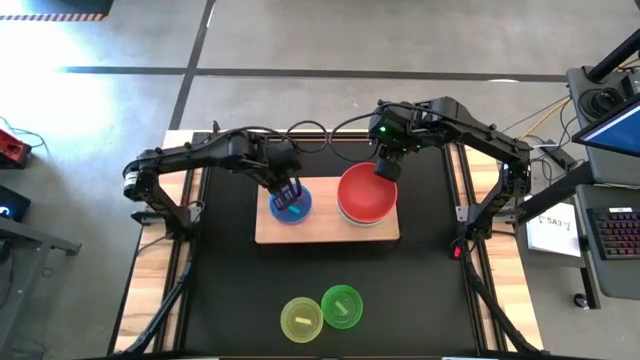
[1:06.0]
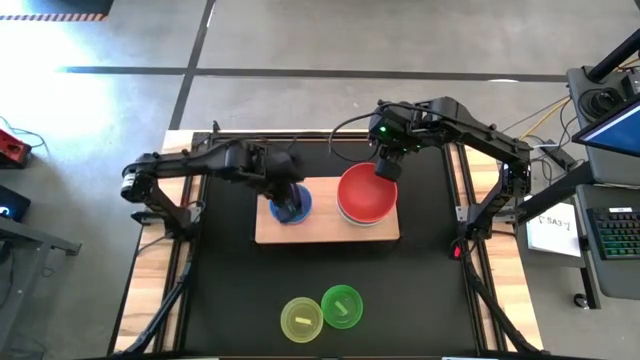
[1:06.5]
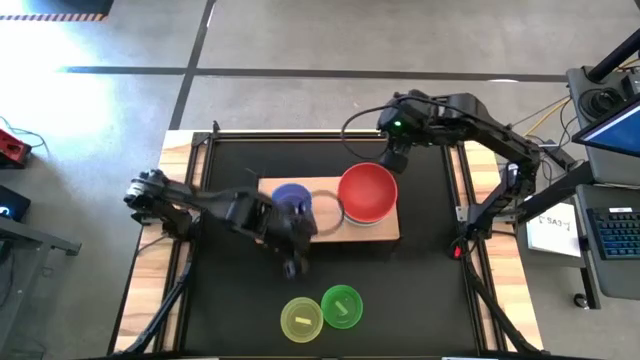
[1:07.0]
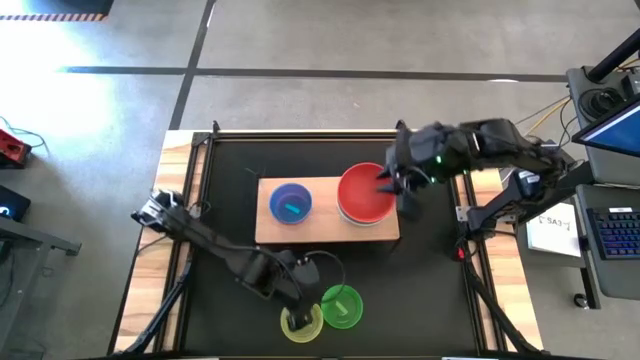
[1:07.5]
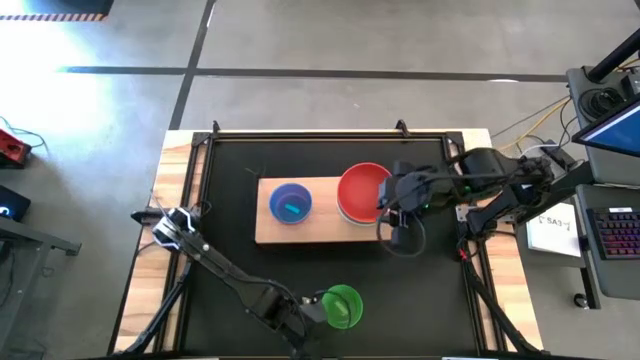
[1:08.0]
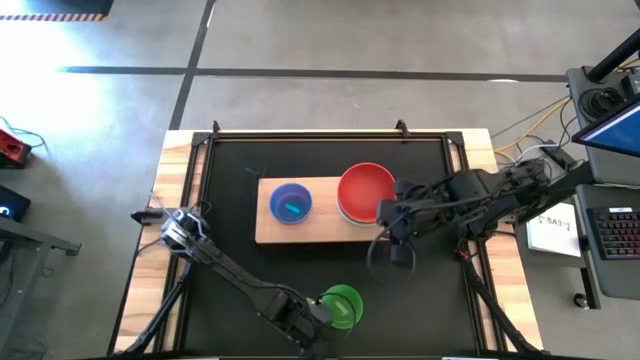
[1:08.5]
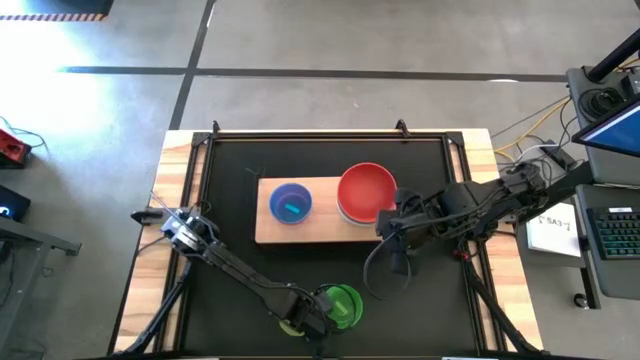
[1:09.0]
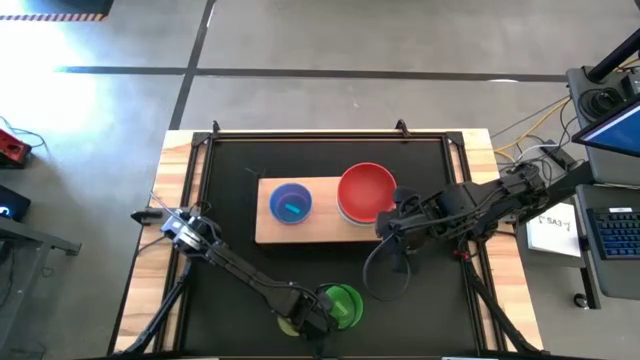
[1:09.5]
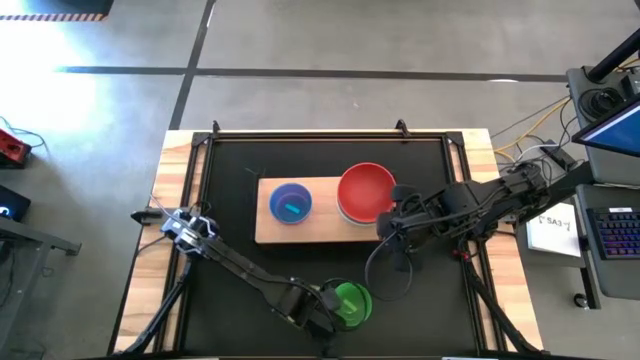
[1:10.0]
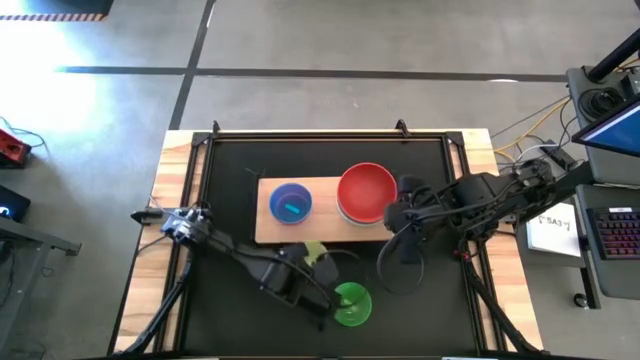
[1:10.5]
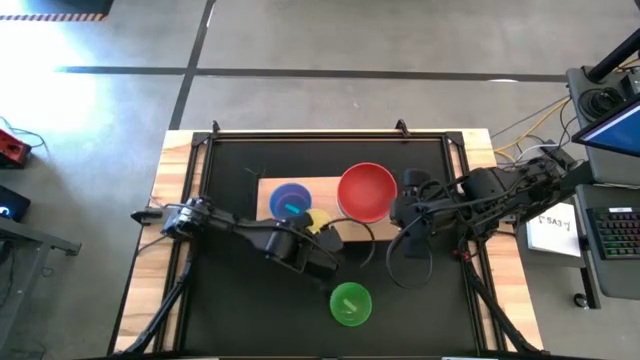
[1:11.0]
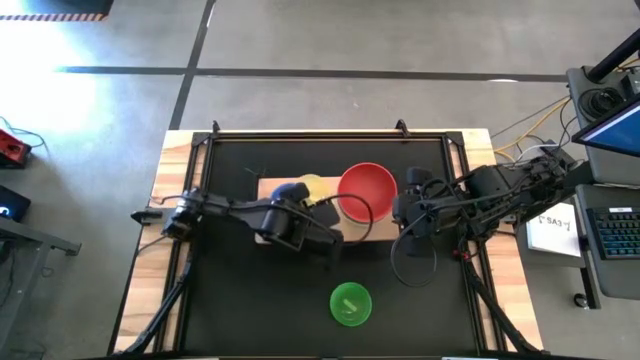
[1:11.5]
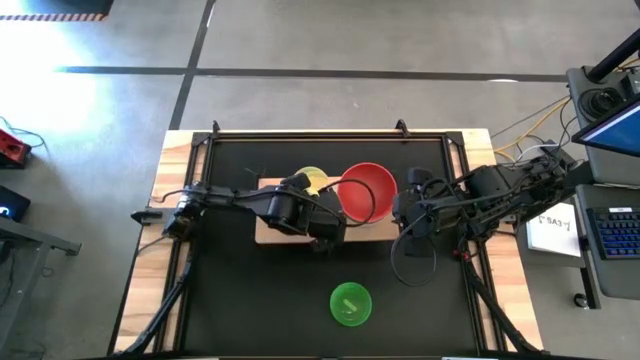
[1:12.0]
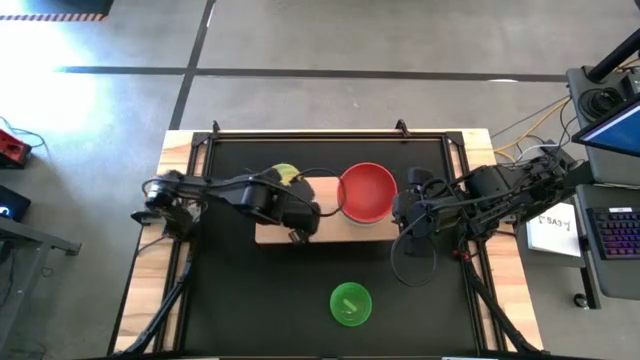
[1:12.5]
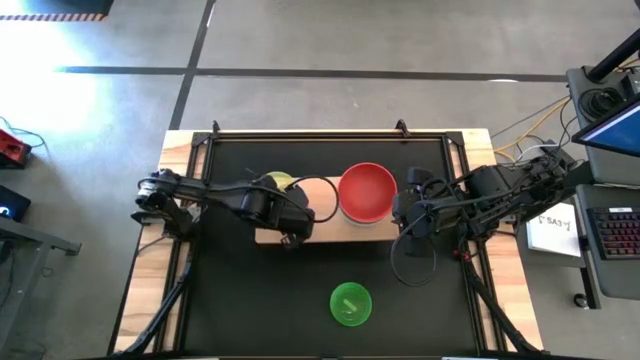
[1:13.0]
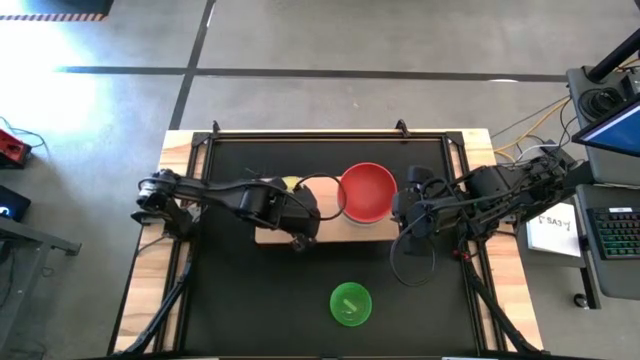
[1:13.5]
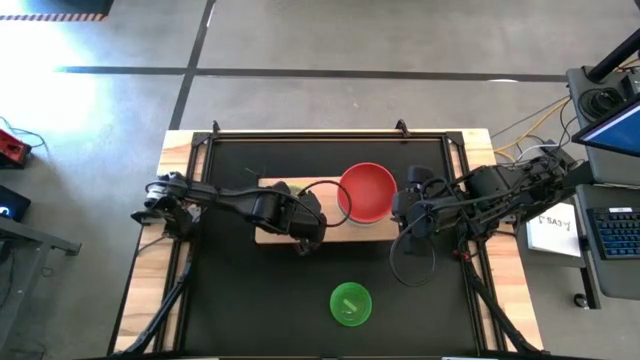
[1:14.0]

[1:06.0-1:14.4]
Task: Place and stack bowls onto a shelf
Stack the small yellow bowl on top of the small light blue bowl on the shelf

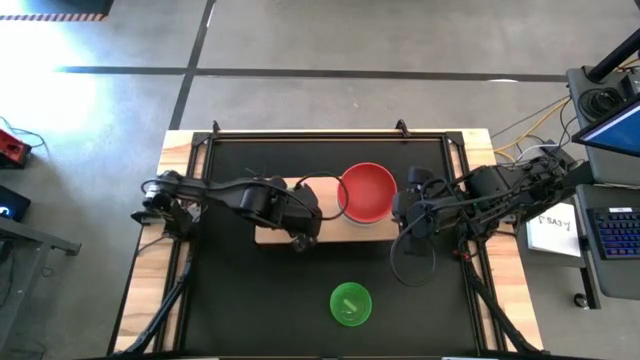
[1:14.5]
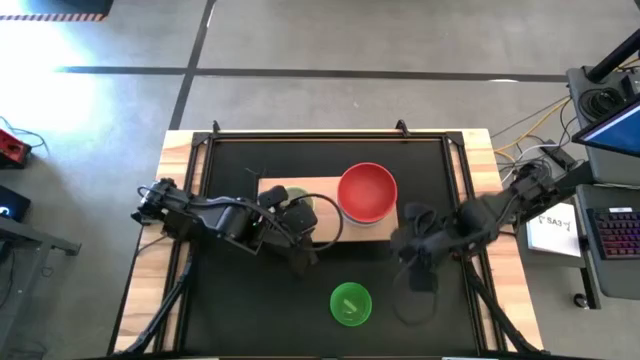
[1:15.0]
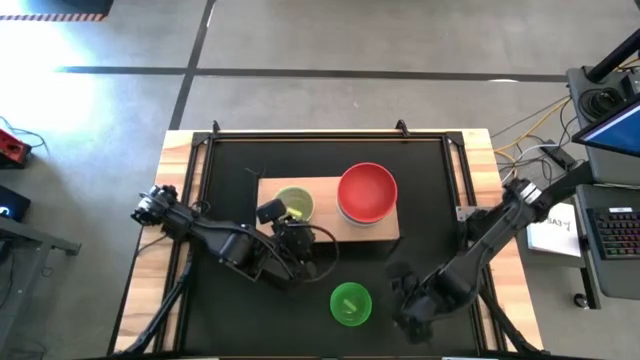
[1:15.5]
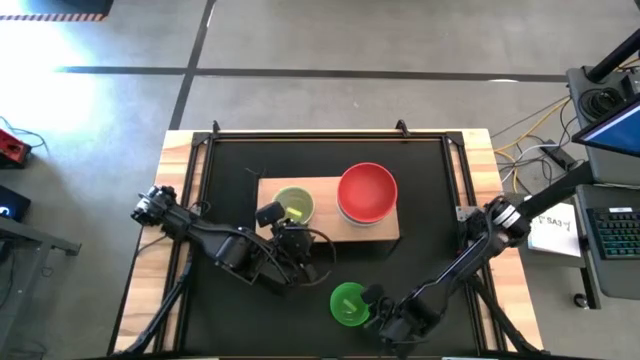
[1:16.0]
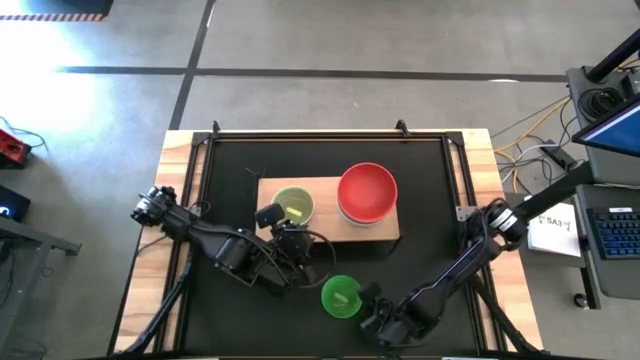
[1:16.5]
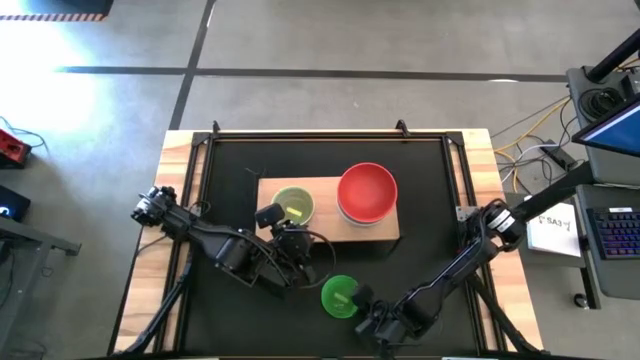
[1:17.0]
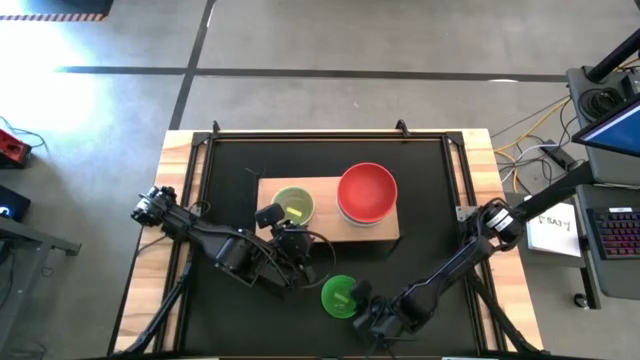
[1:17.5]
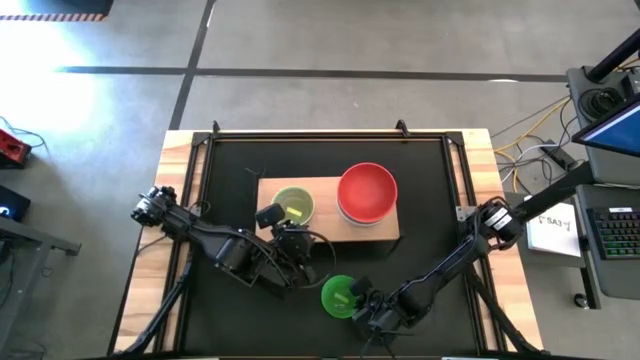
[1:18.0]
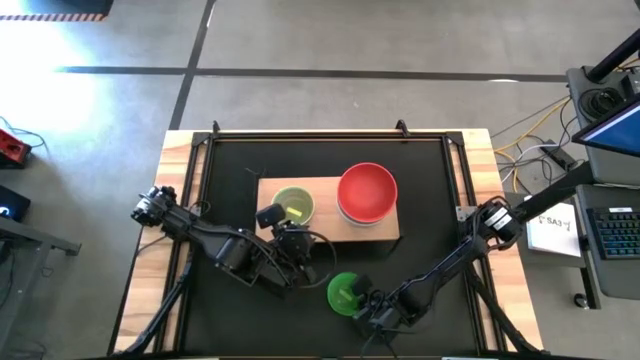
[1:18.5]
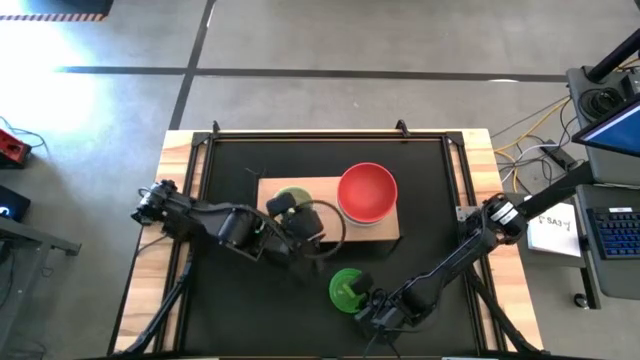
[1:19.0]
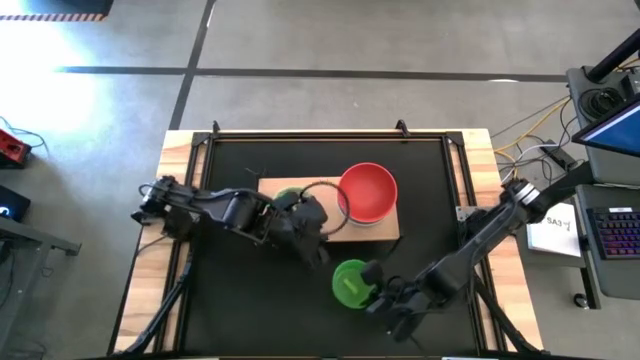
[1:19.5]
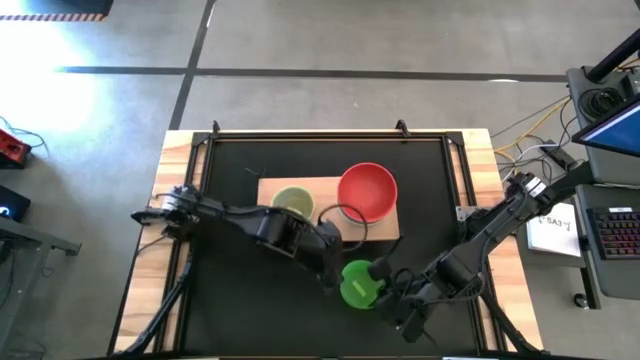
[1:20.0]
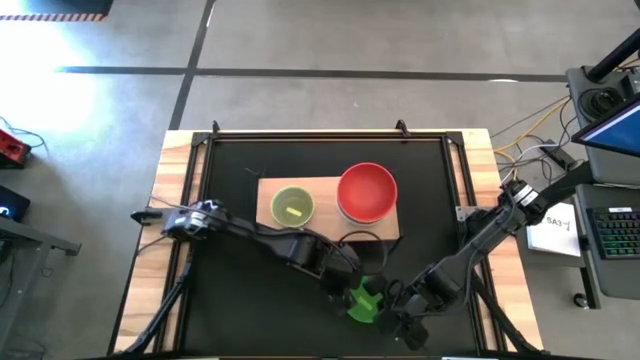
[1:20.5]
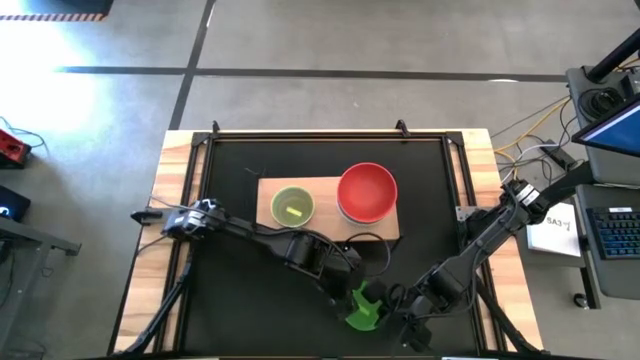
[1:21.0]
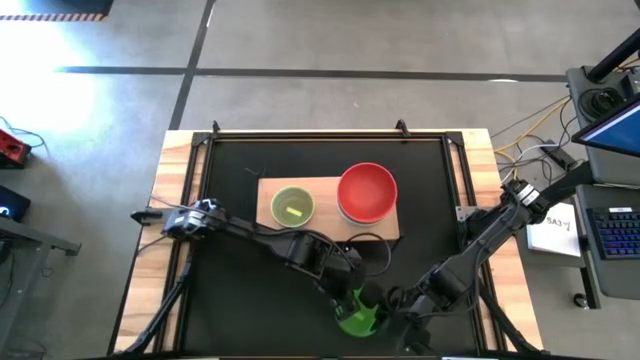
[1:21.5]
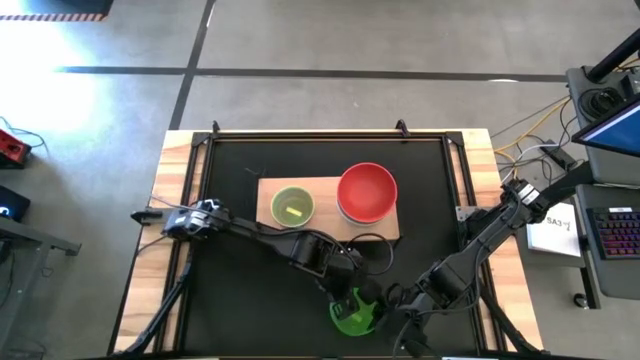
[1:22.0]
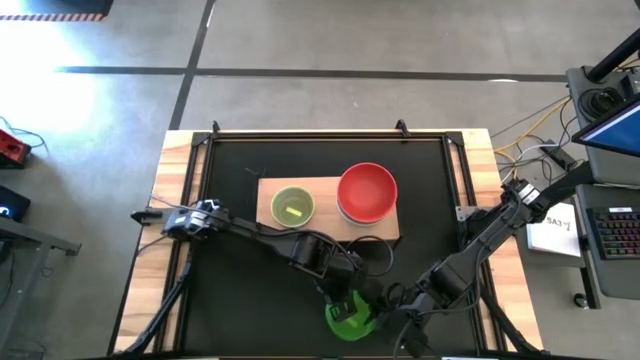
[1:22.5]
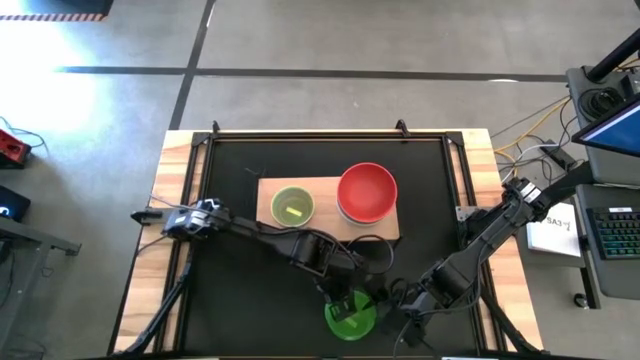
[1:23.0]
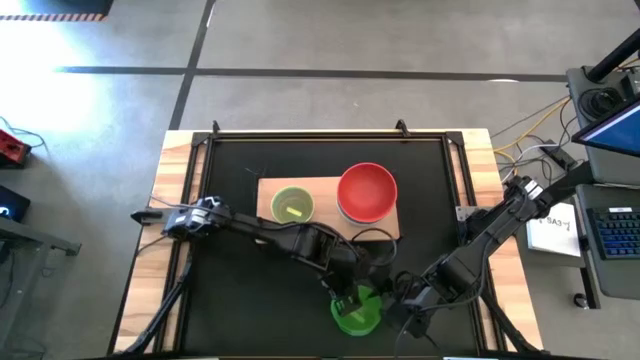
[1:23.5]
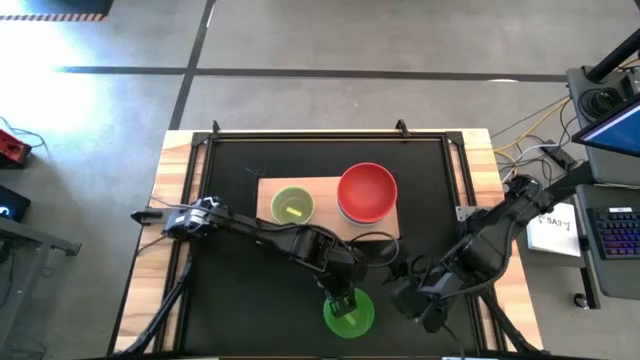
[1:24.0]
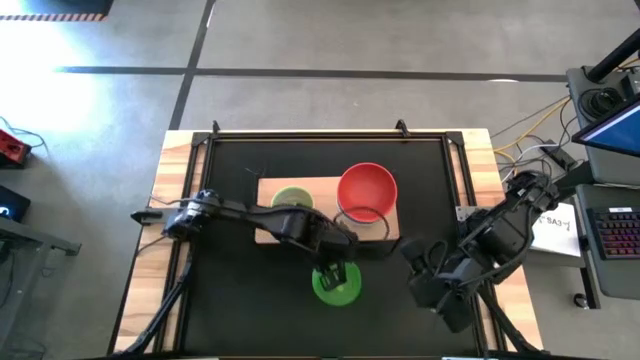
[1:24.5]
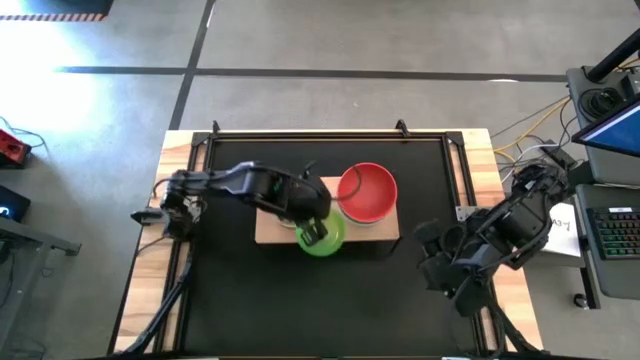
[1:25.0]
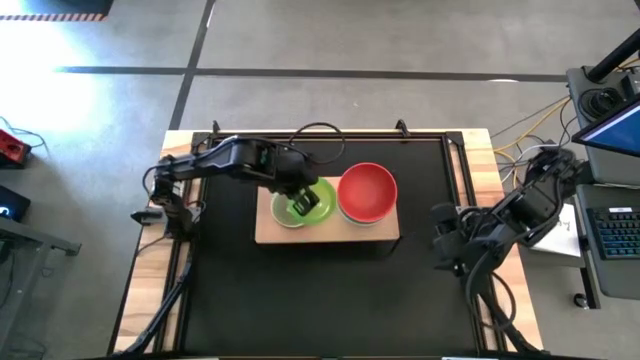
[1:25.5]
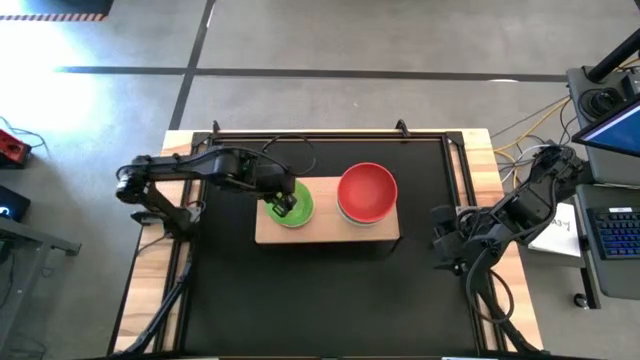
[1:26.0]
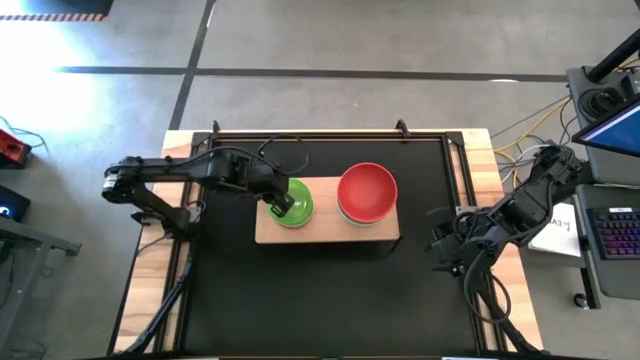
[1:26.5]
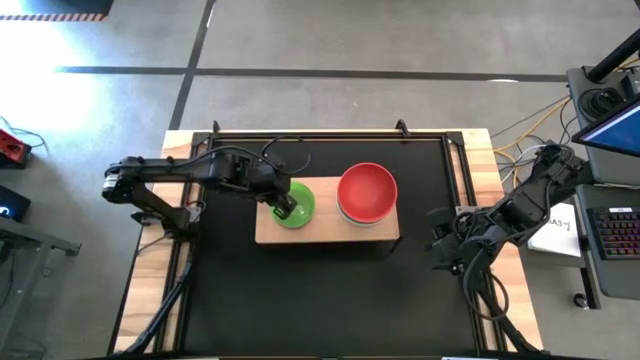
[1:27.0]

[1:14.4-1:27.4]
Stack the small light green bowl on top of the small yellow bowl on the shelf

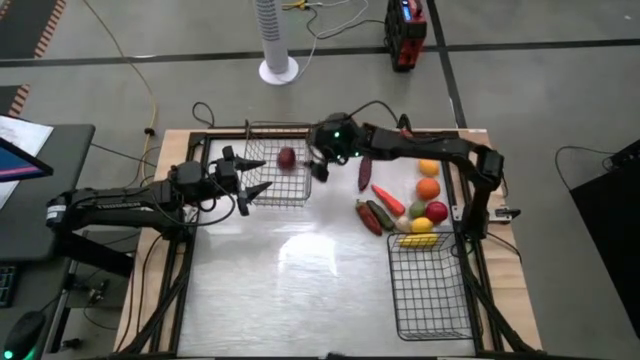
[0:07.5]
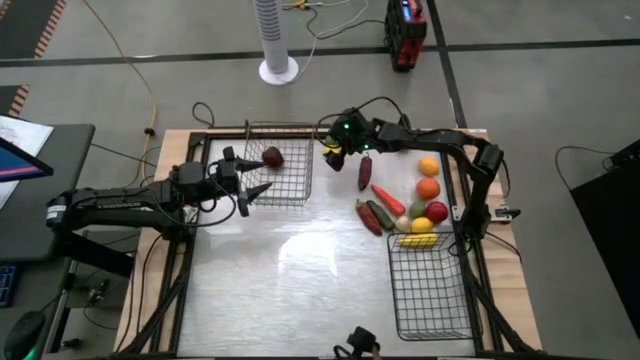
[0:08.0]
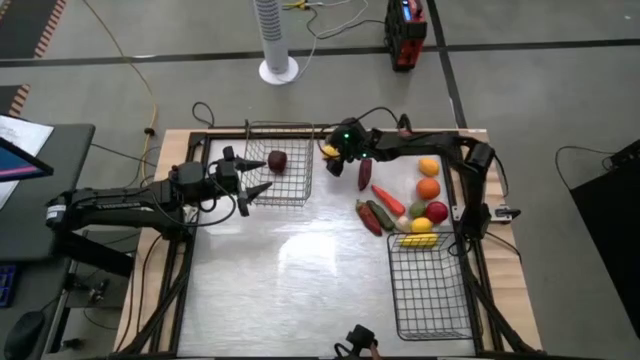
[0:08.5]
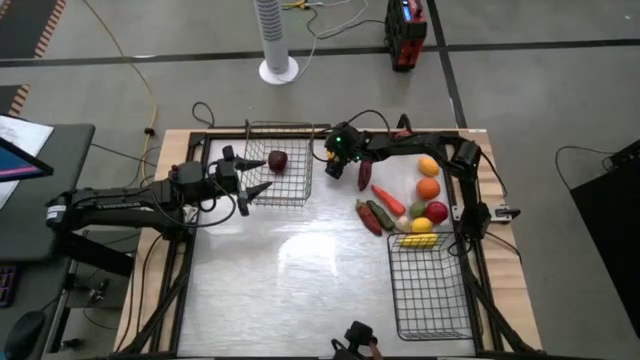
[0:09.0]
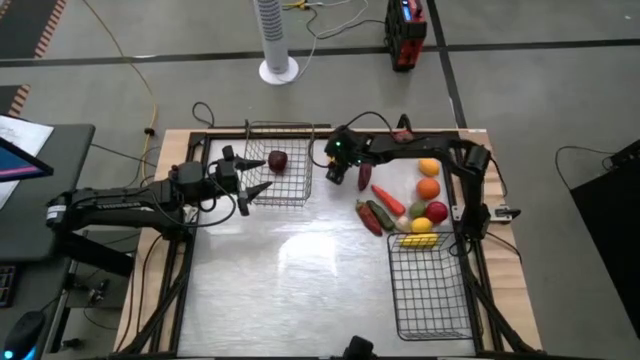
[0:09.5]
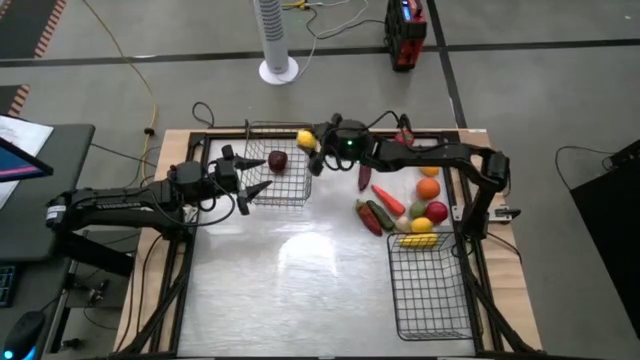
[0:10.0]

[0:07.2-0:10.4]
Task: Sort produce into baskets
Put the top left lemon into the left wire basket
